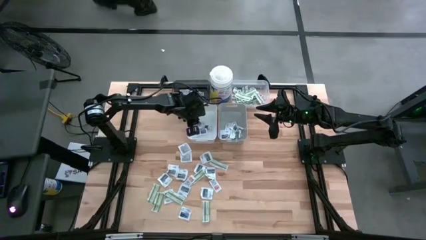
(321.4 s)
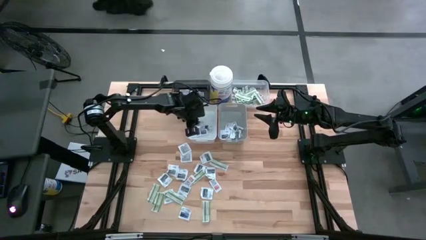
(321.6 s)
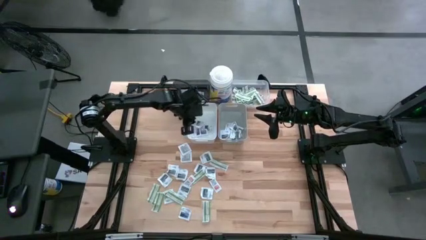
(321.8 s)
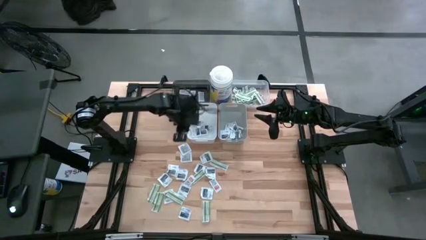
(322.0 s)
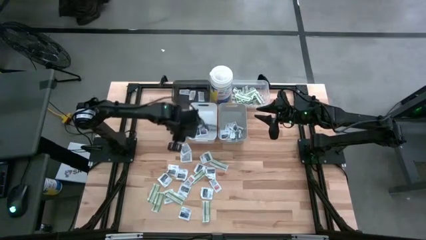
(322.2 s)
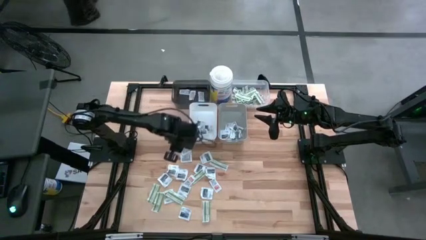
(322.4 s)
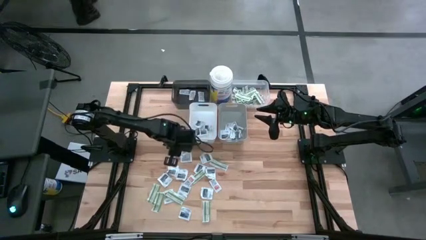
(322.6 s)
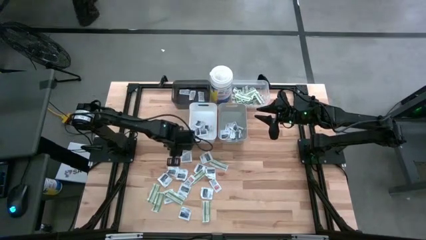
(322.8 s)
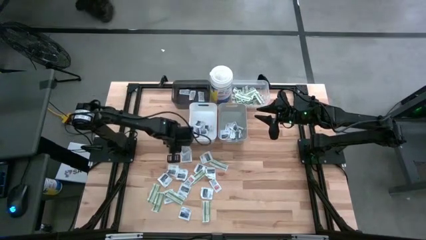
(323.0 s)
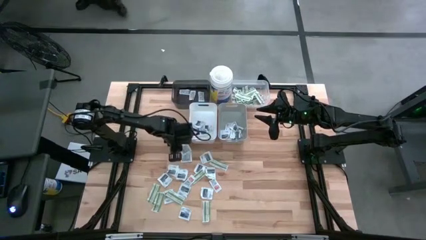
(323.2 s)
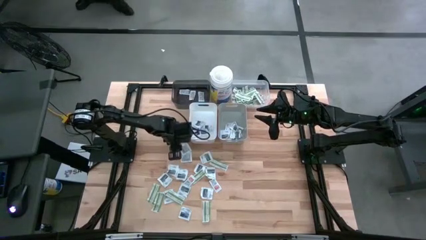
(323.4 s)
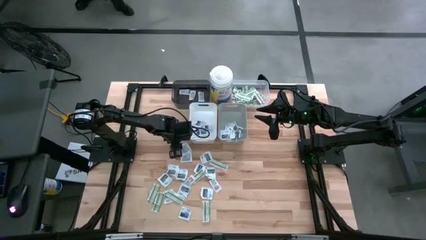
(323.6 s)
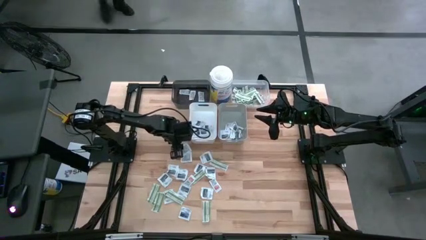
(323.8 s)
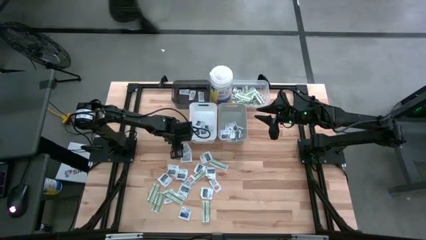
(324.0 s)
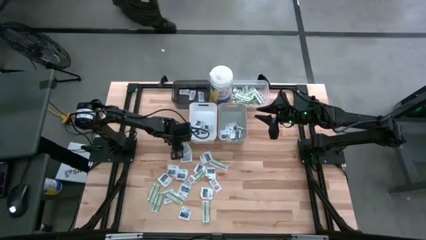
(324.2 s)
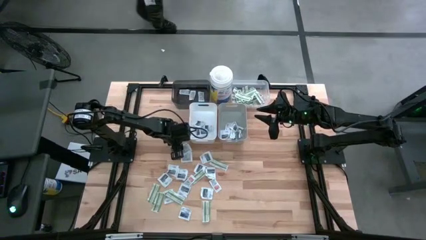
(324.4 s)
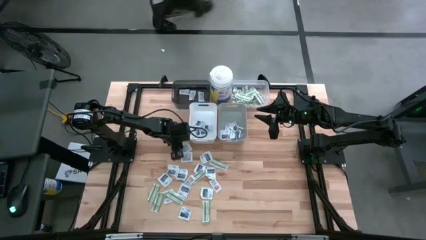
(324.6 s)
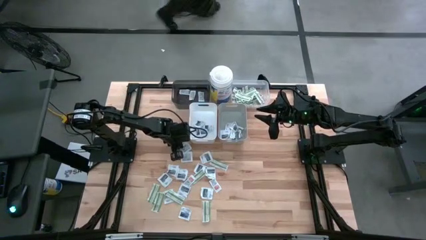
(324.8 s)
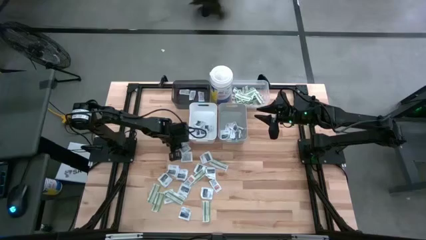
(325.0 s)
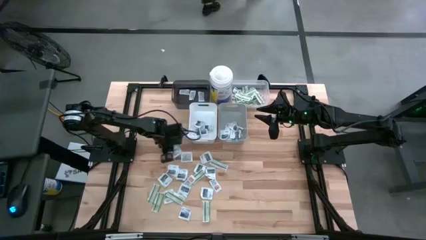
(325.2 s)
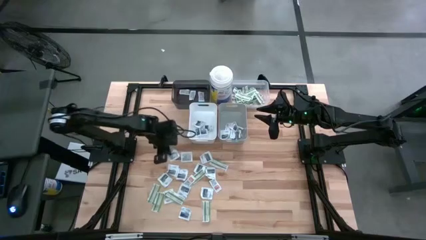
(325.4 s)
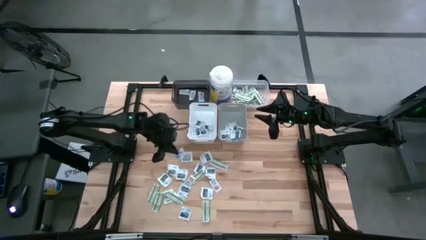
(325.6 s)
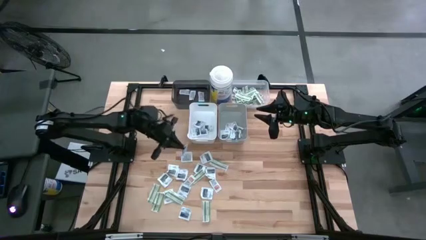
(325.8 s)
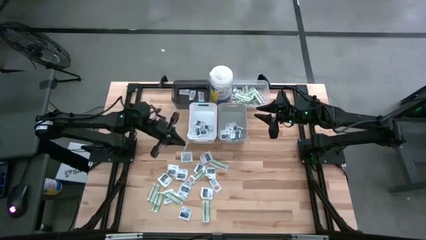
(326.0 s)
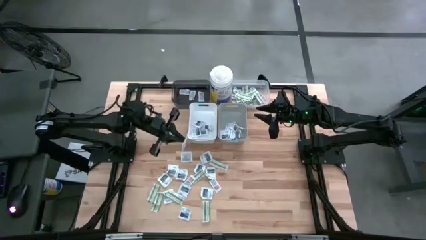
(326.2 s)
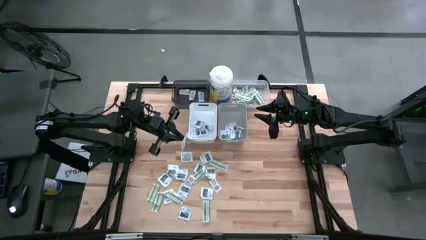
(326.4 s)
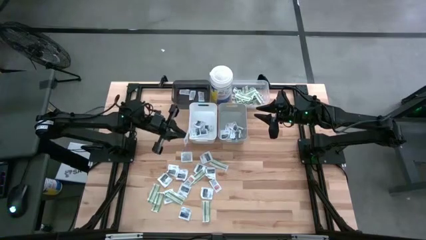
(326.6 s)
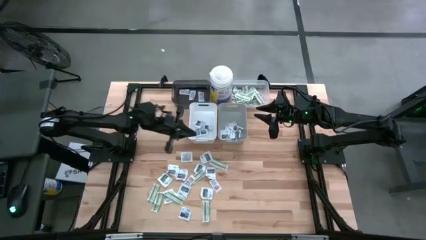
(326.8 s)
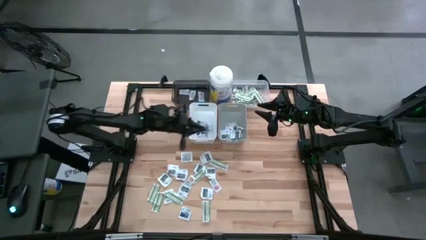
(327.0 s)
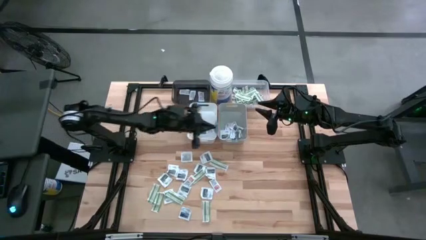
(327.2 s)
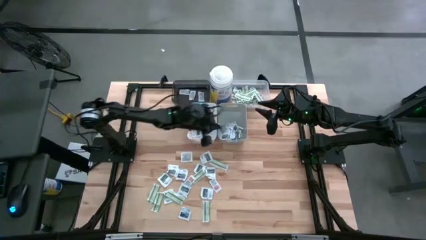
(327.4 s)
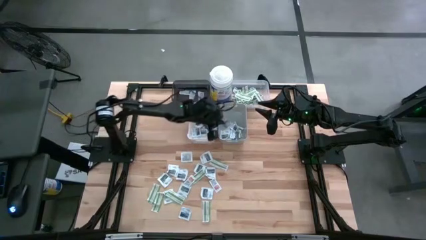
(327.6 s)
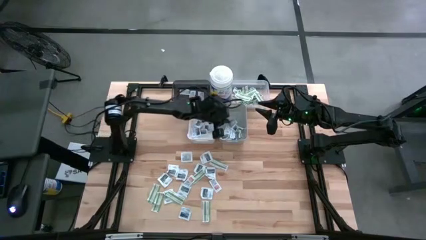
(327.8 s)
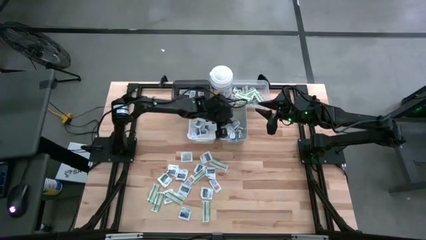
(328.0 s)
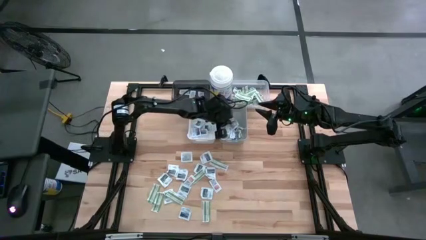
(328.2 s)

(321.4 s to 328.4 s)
Task: Pick & Place First Aid Supplies
Put the wipe into the gray bin

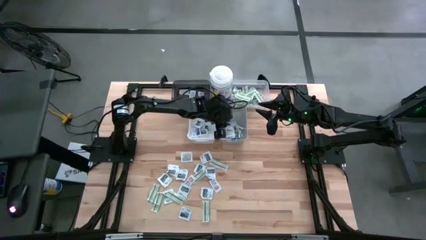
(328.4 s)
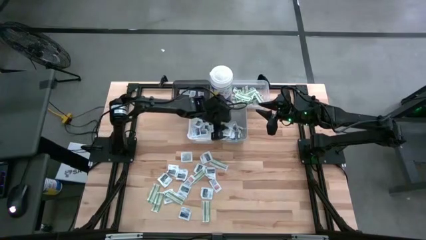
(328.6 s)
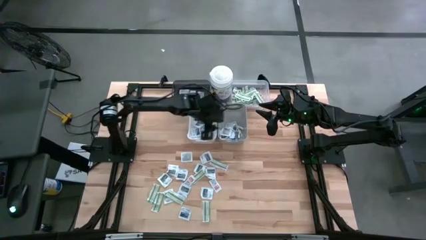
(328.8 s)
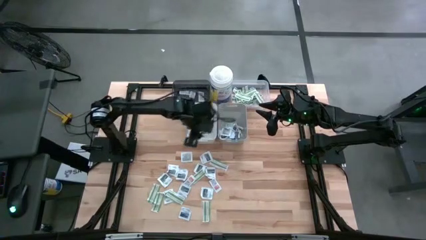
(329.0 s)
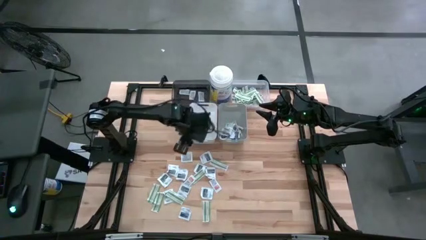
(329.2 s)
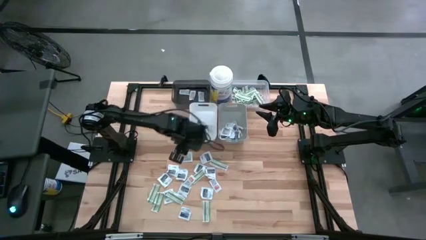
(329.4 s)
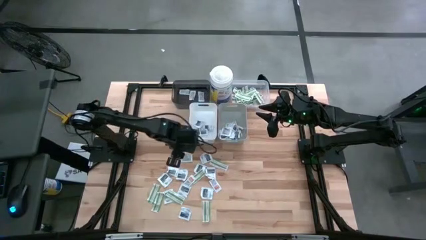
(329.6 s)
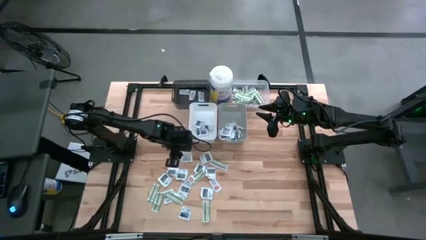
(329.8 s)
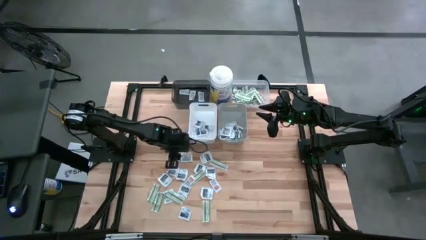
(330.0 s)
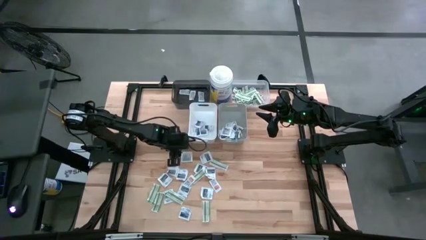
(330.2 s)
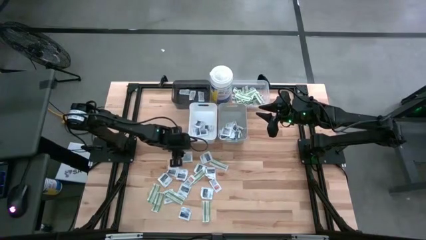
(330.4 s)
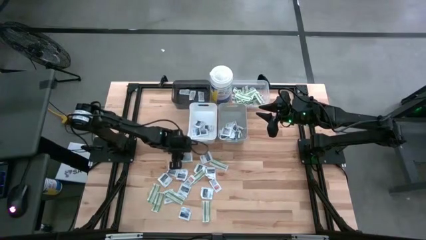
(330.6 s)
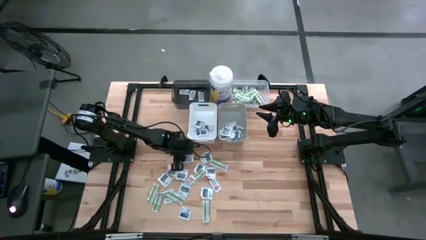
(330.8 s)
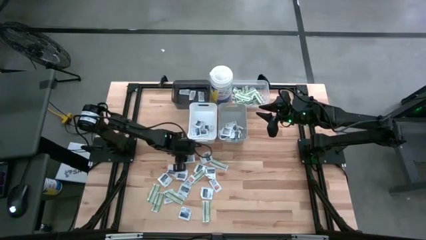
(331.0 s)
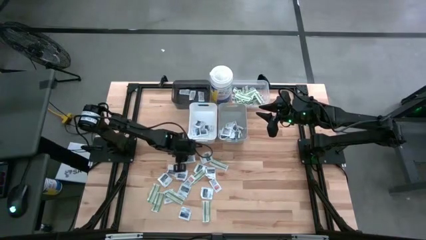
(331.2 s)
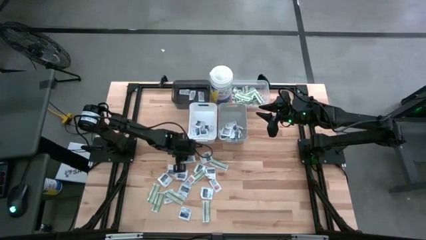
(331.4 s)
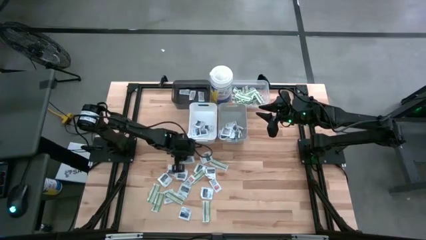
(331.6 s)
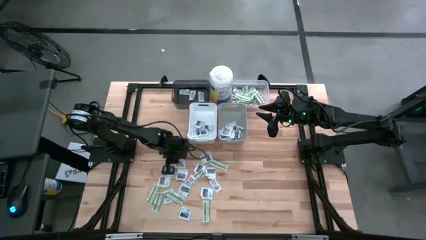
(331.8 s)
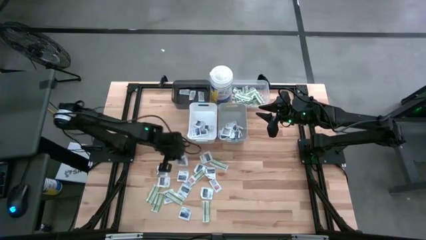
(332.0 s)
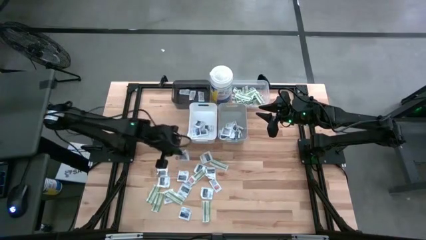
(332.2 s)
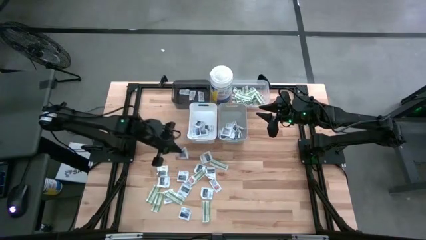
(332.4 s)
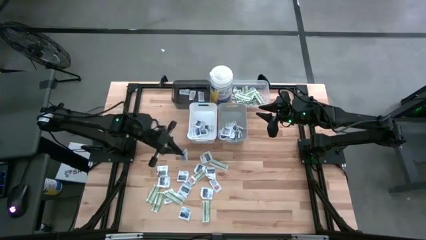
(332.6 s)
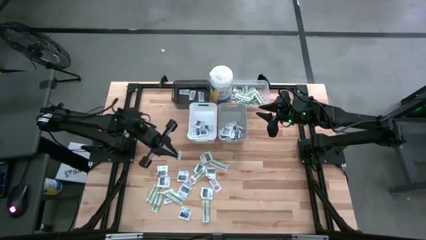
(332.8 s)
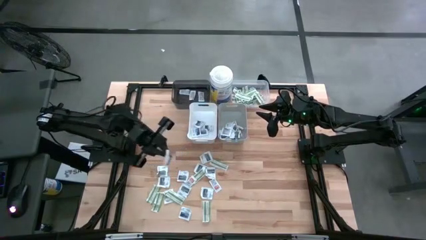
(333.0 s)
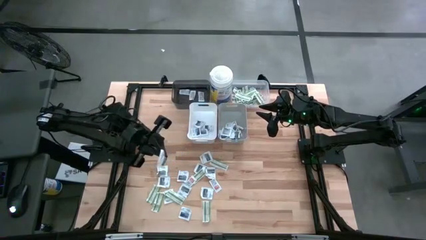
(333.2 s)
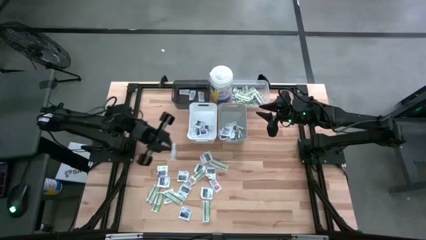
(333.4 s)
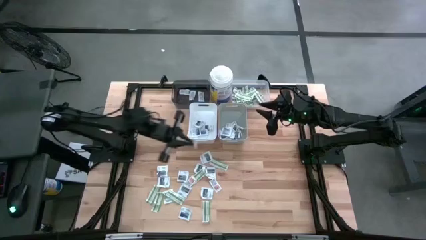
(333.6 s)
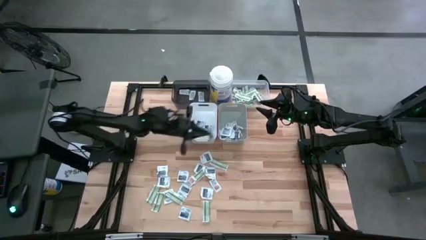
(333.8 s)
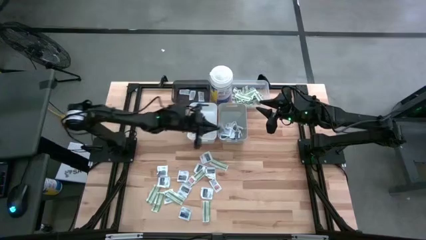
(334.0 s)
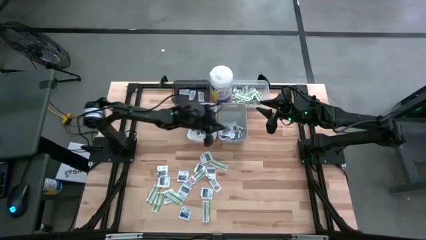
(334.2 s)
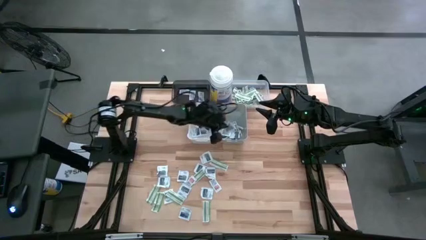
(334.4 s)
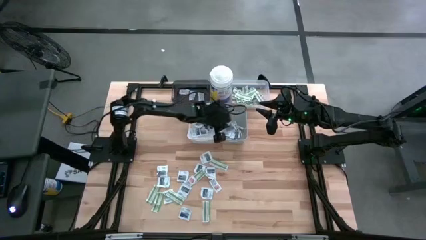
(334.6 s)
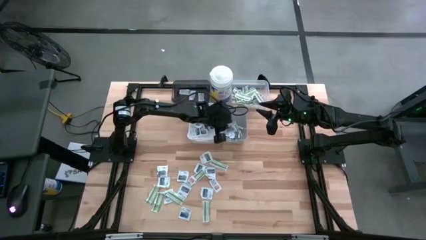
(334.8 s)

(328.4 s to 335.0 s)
Put the wipe into the gray bin

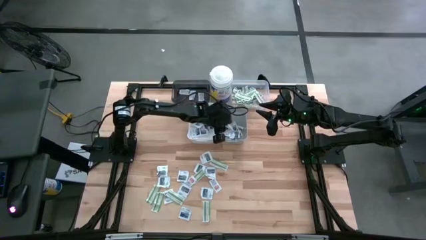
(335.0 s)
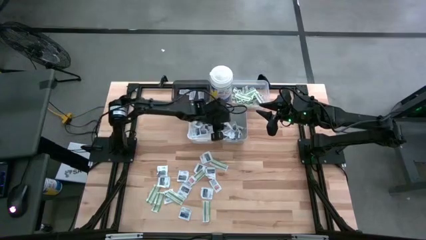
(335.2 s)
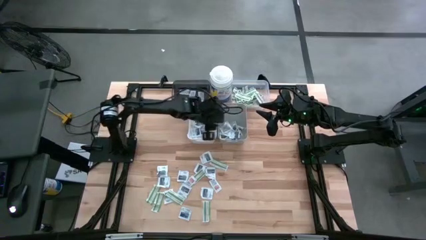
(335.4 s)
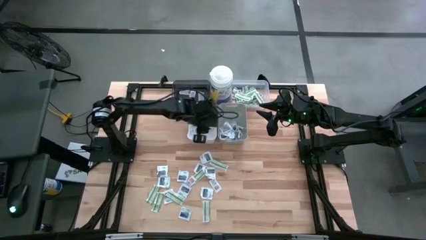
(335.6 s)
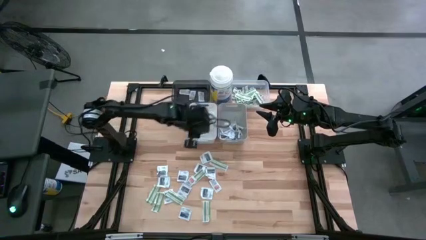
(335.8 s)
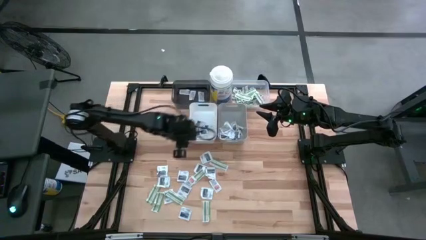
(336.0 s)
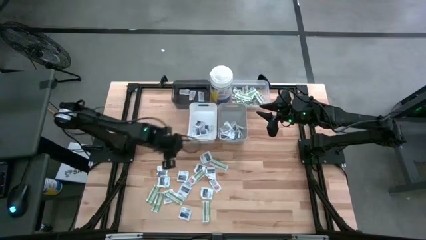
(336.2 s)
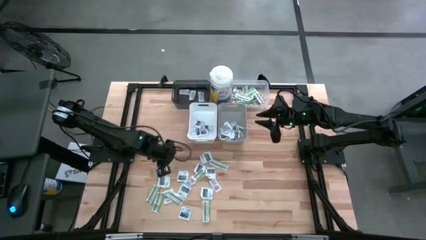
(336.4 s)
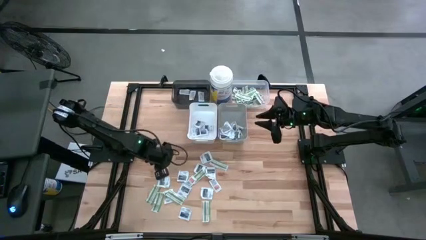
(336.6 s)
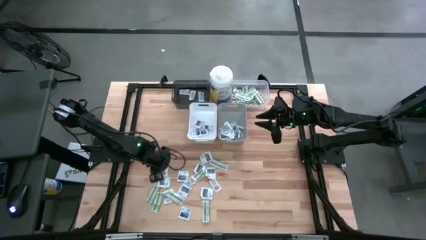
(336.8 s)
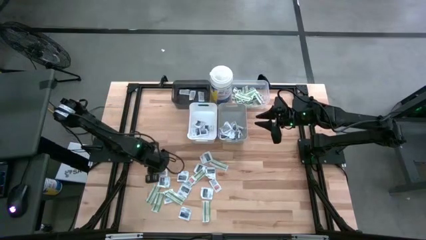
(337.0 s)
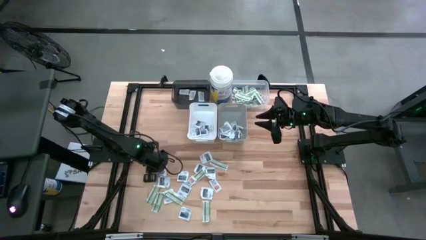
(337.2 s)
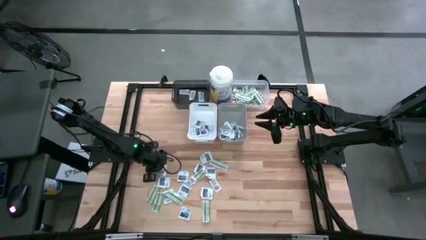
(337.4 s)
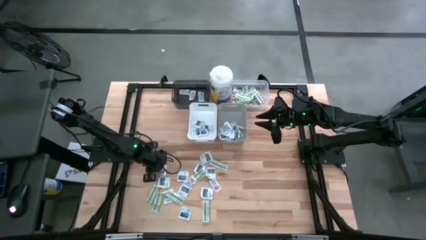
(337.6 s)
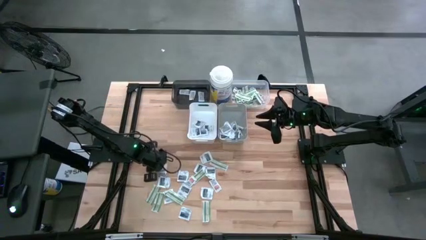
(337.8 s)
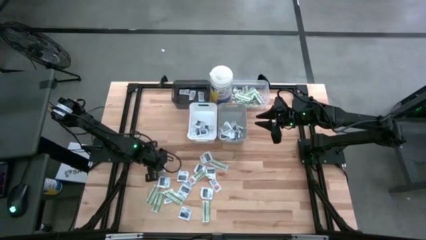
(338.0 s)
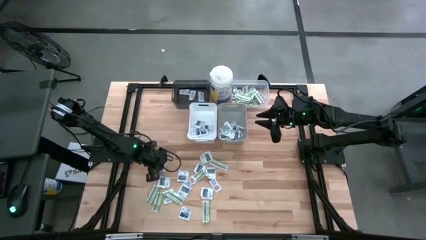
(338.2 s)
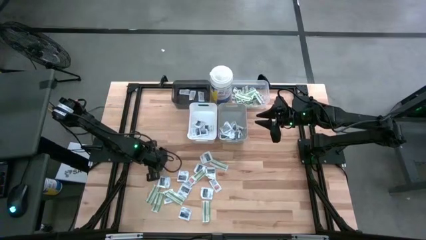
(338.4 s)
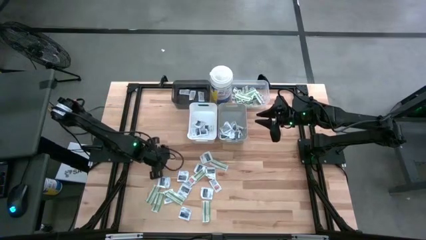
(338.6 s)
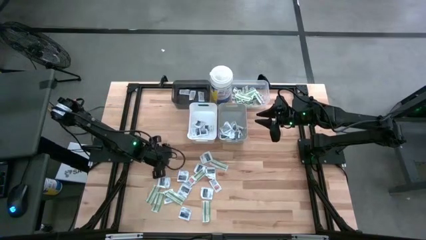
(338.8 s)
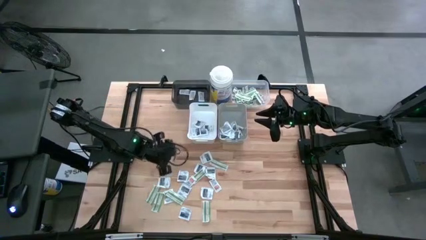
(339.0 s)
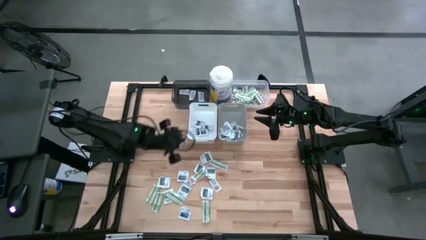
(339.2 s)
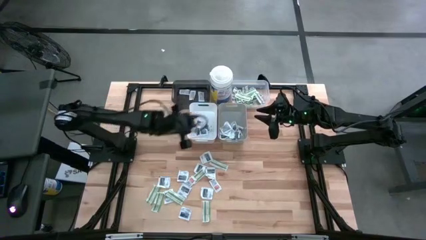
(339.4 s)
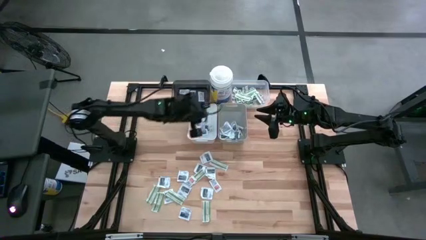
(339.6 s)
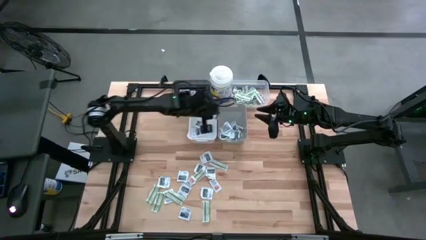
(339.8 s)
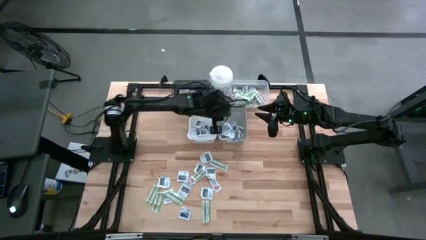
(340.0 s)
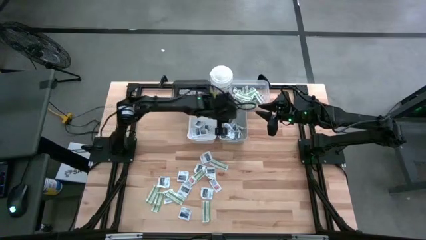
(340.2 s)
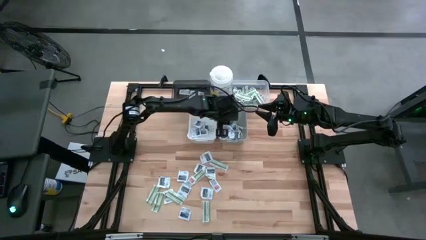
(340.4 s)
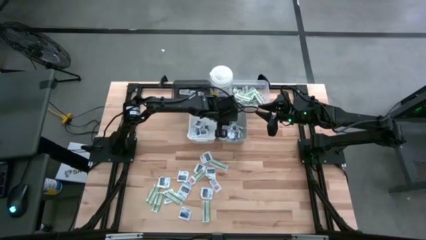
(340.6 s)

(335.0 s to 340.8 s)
Put the wipe into the gray bin
